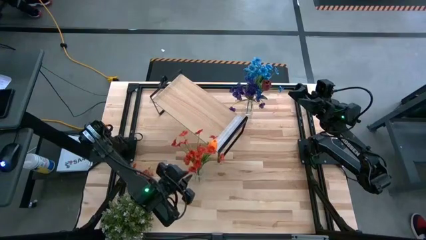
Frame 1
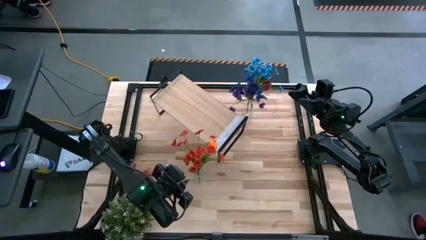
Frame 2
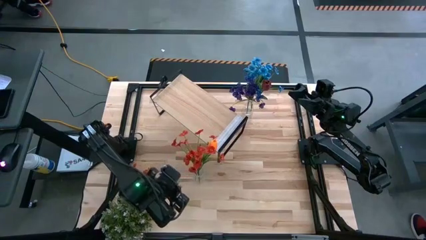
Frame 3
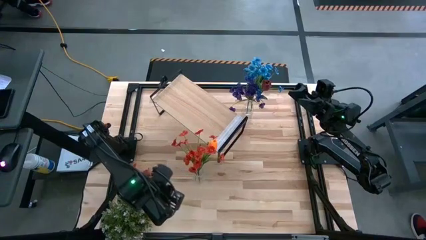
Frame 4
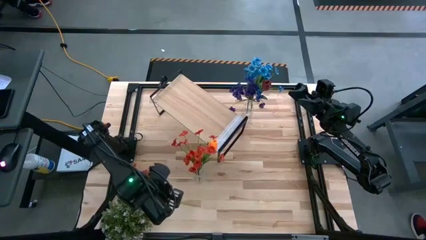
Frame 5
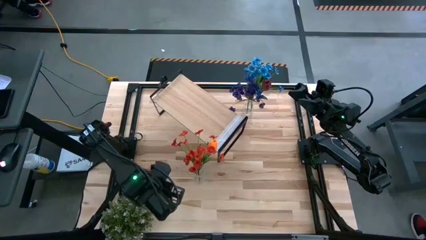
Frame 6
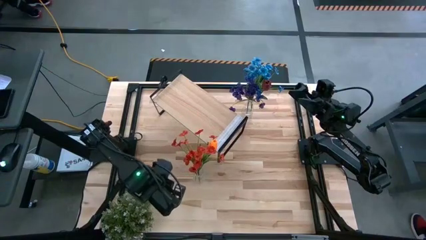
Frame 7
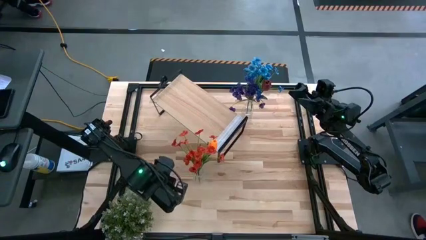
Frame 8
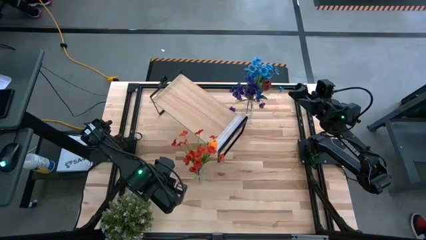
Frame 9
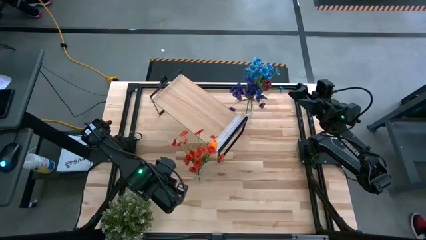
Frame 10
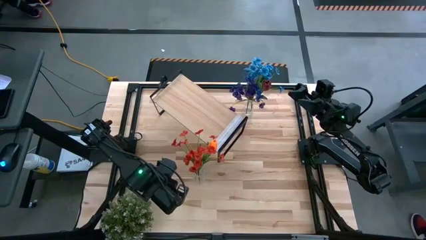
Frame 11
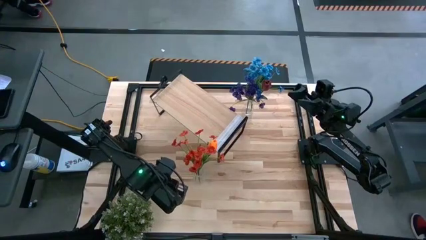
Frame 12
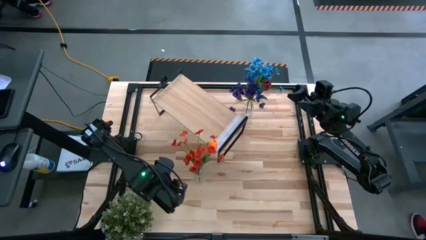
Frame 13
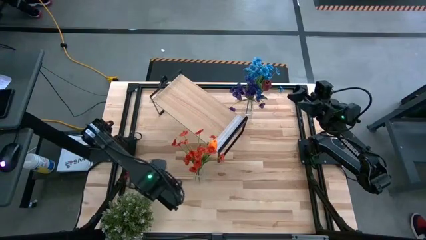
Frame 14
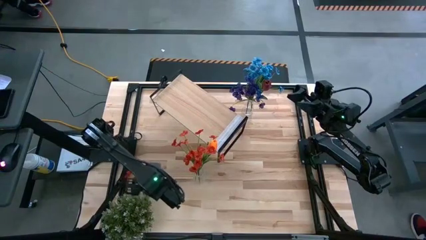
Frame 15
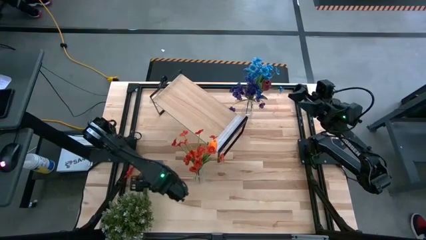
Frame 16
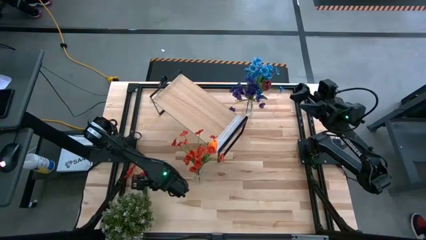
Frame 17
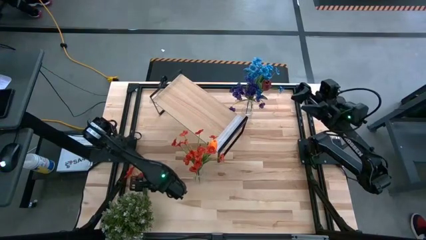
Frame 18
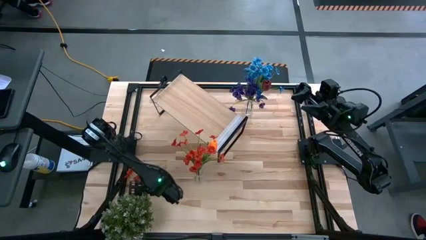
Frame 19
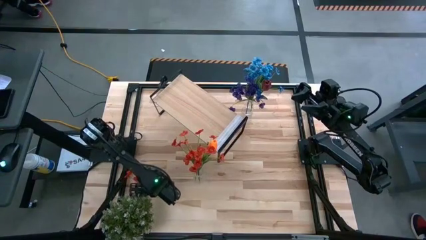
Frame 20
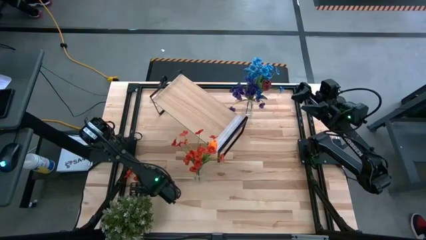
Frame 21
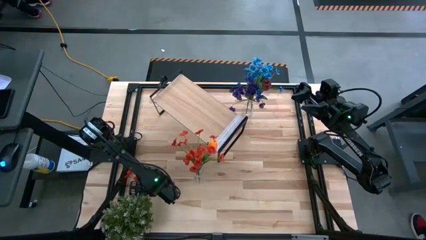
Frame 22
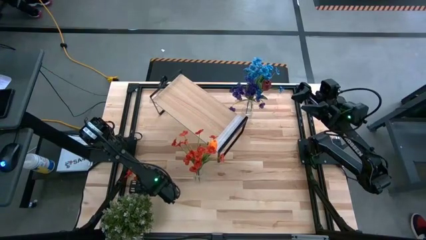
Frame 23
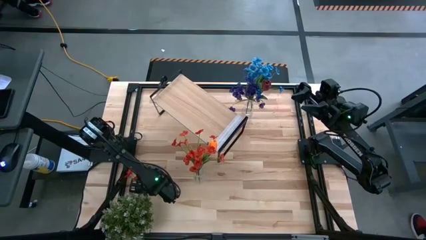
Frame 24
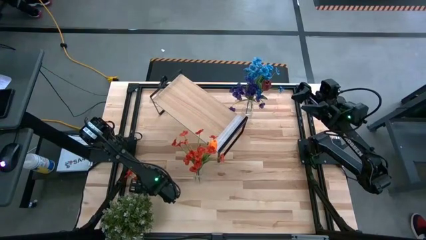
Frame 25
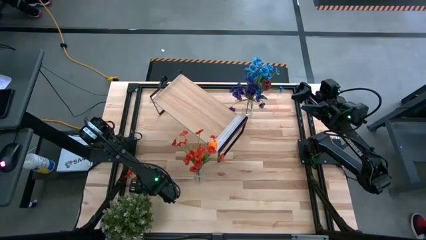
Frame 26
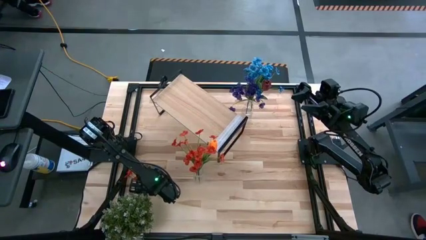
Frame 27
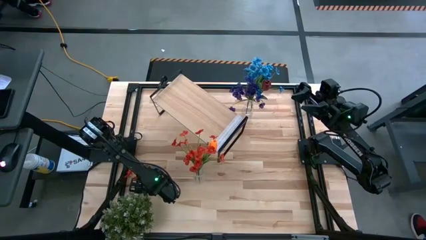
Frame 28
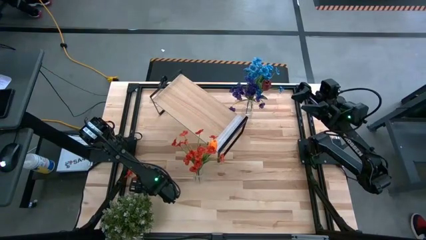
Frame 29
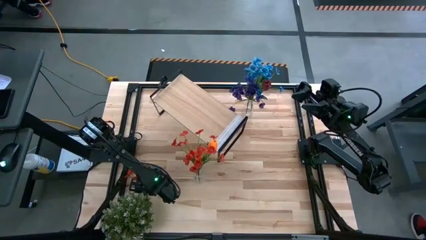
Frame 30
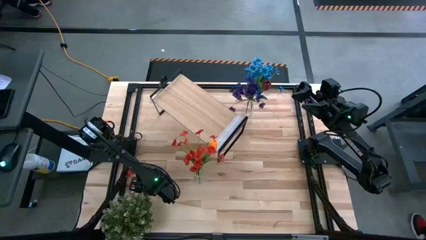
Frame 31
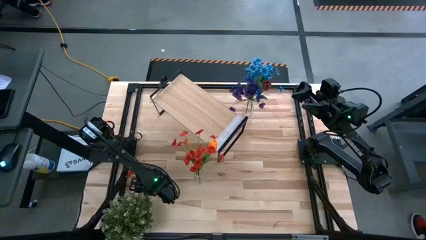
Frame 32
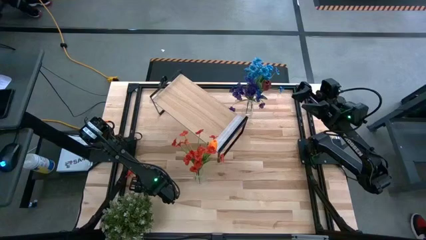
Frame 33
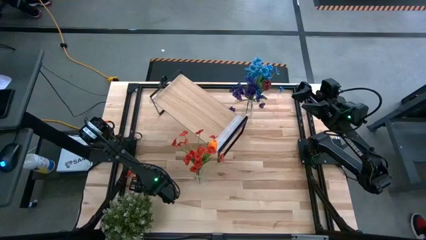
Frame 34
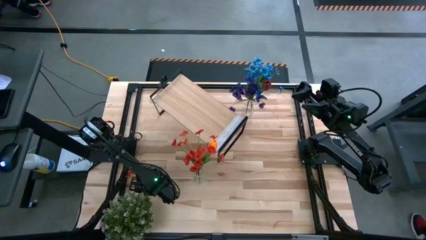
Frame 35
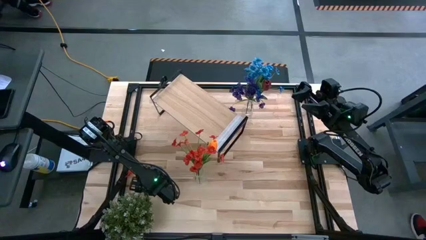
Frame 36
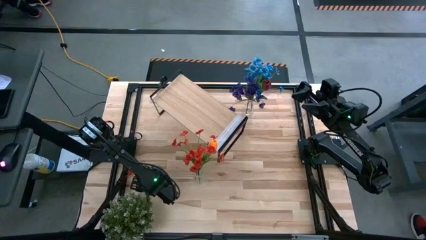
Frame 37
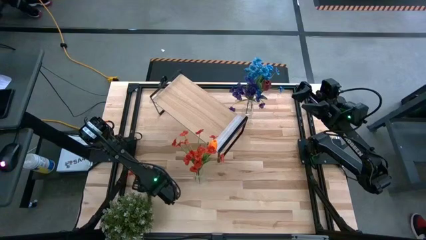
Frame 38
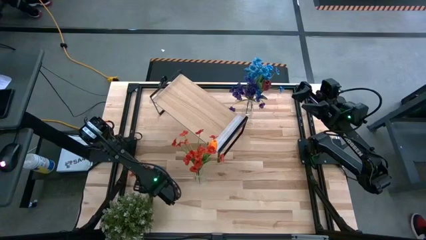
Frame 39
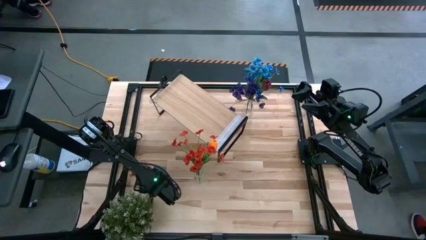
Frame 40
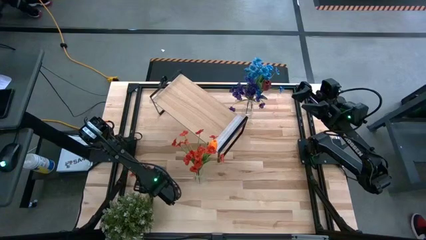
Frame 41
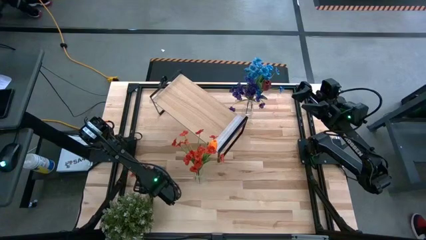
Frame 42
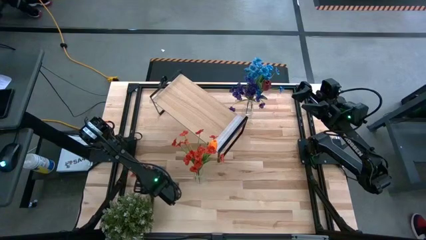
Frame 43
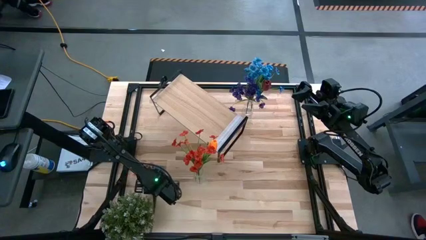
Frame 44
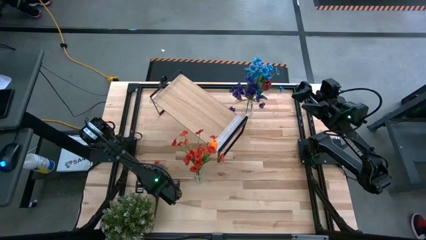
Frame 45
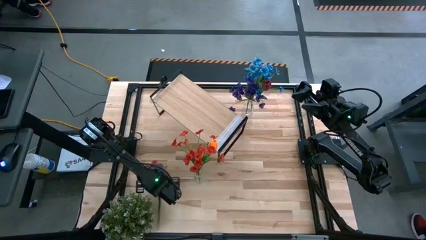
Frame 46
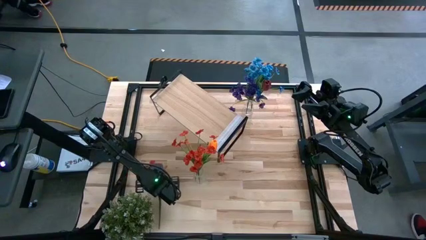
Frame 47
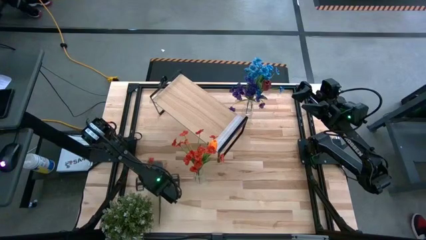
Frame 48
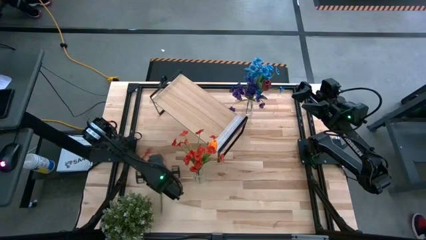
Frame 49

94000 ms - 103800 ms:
Task: Pick and place flowers into a vace then onto a shelf
Put the orange flowers into the bottom transparent flower vase
